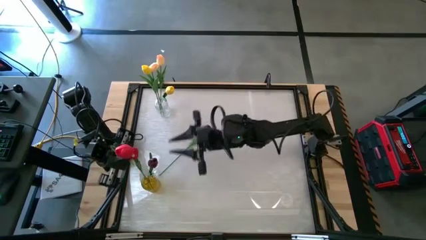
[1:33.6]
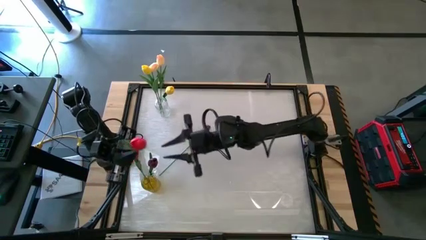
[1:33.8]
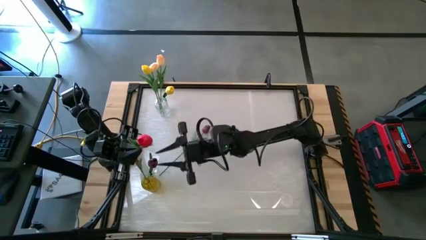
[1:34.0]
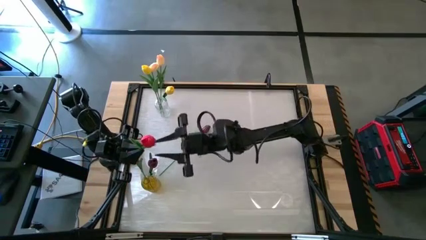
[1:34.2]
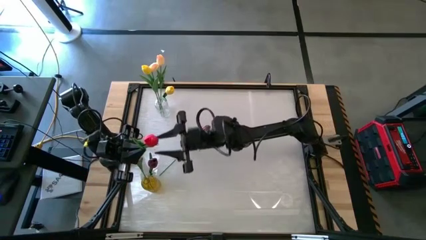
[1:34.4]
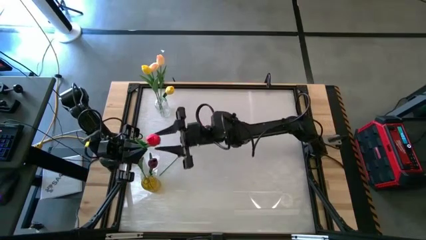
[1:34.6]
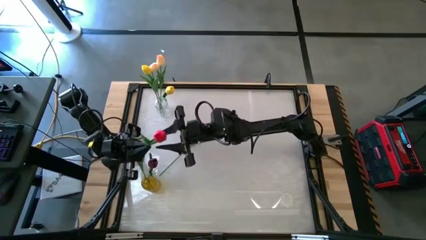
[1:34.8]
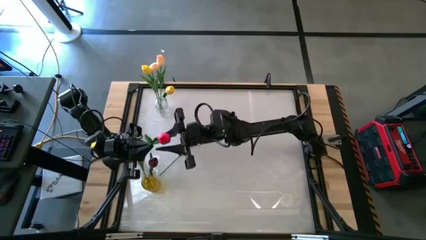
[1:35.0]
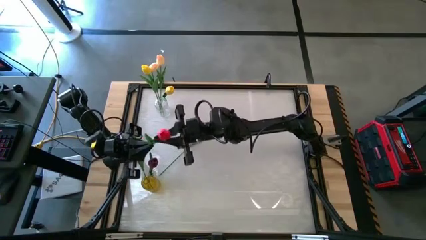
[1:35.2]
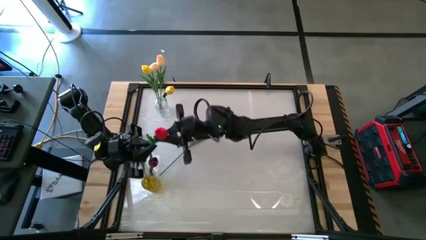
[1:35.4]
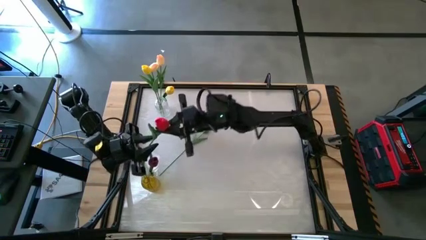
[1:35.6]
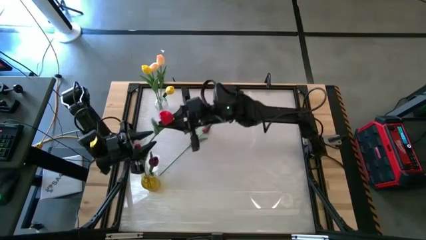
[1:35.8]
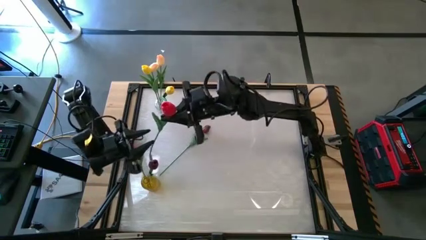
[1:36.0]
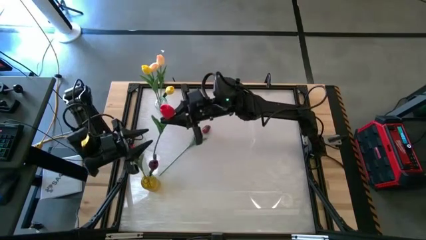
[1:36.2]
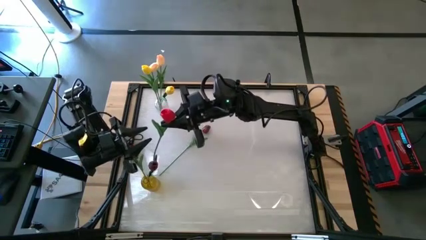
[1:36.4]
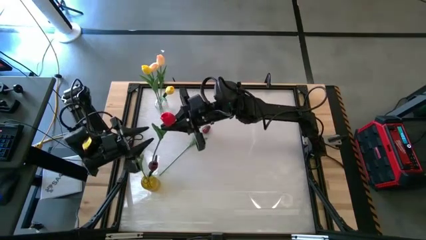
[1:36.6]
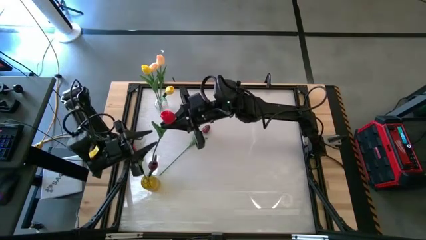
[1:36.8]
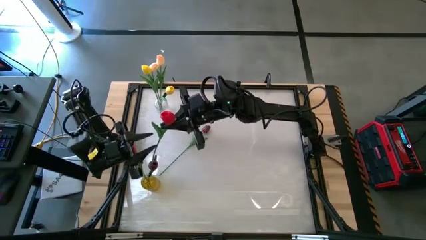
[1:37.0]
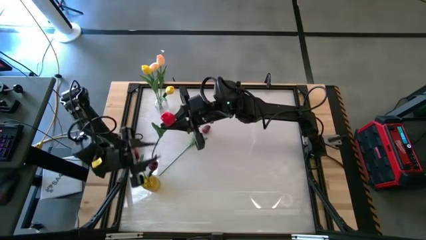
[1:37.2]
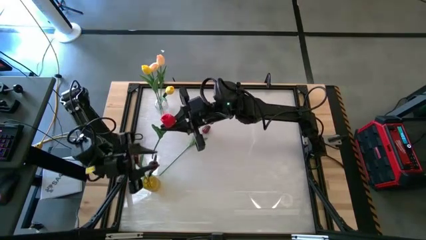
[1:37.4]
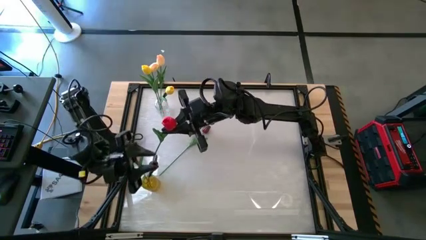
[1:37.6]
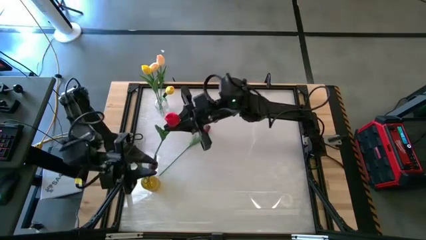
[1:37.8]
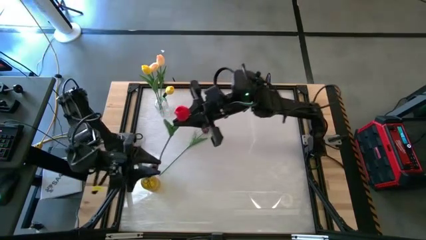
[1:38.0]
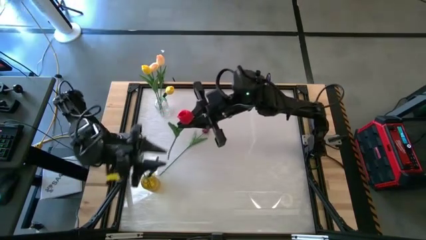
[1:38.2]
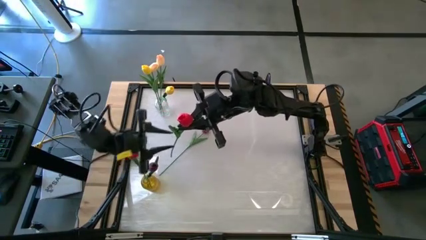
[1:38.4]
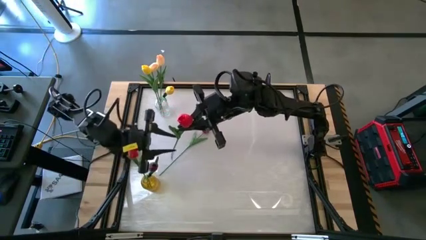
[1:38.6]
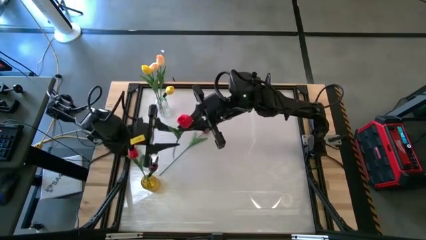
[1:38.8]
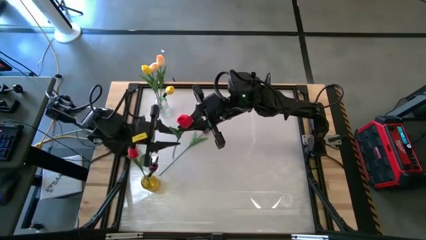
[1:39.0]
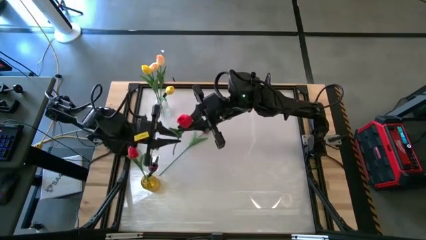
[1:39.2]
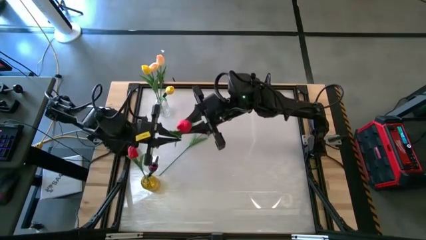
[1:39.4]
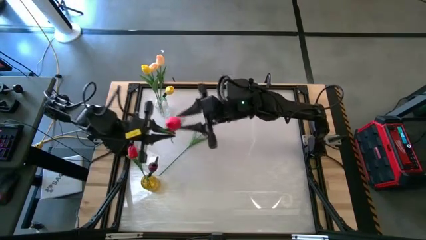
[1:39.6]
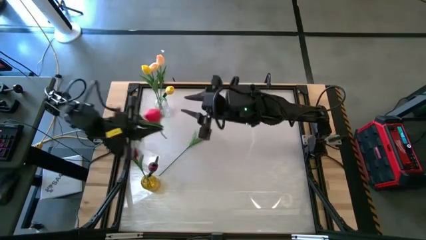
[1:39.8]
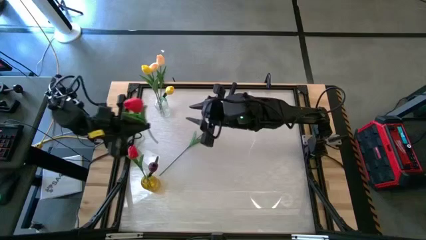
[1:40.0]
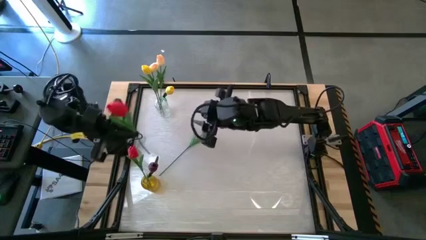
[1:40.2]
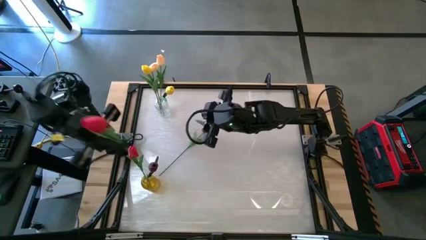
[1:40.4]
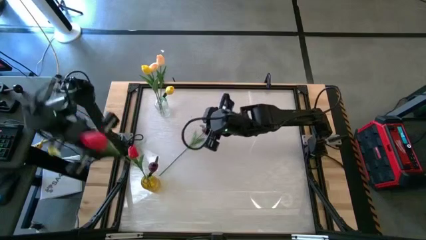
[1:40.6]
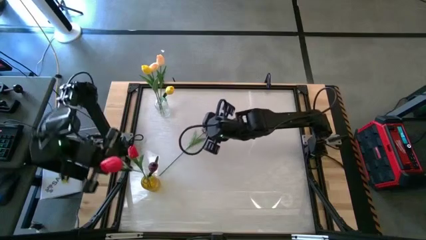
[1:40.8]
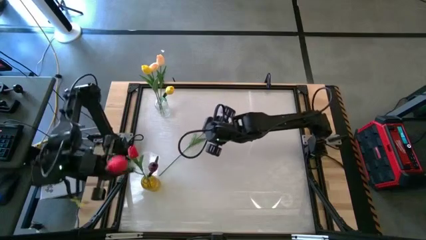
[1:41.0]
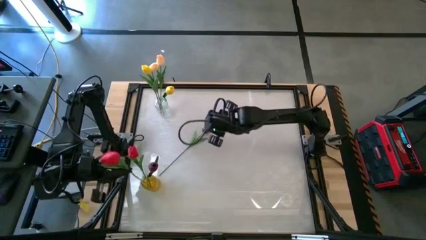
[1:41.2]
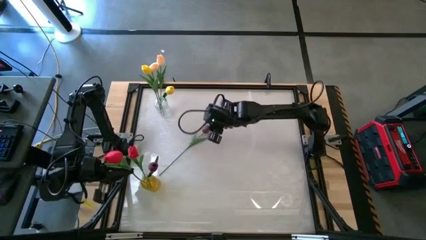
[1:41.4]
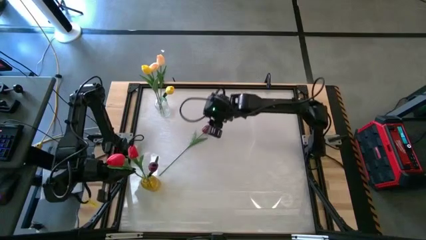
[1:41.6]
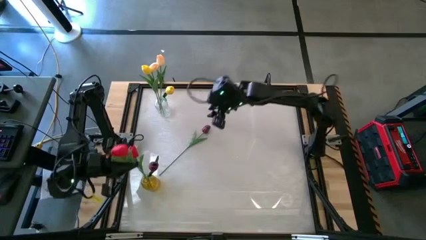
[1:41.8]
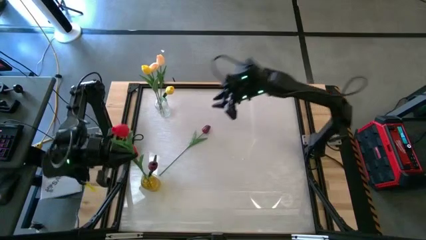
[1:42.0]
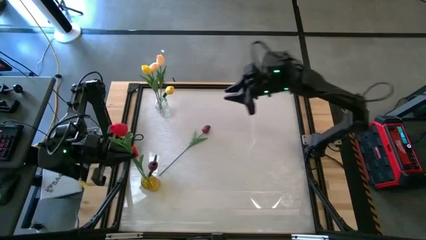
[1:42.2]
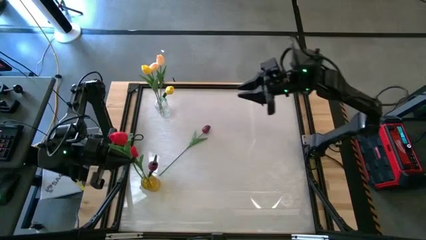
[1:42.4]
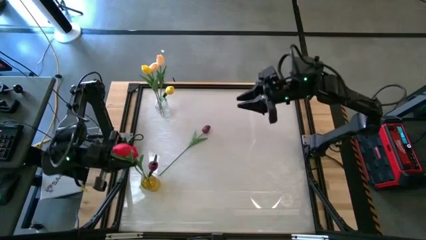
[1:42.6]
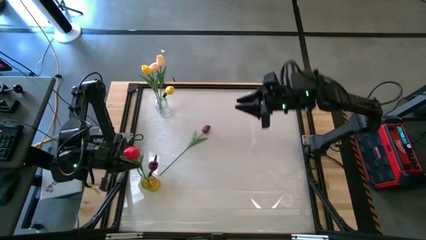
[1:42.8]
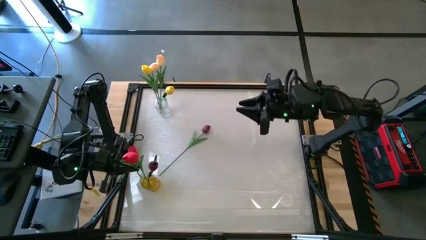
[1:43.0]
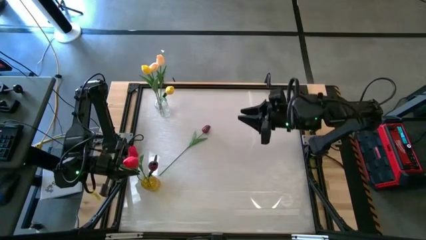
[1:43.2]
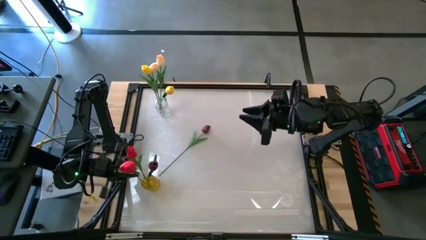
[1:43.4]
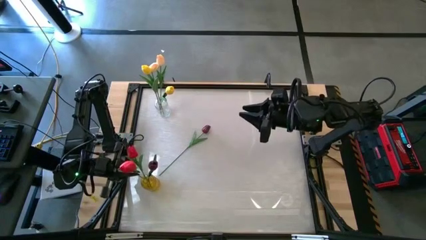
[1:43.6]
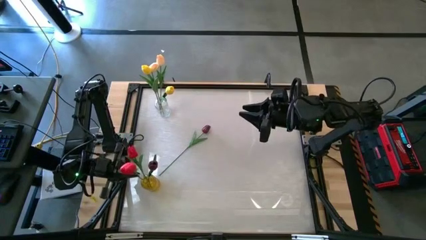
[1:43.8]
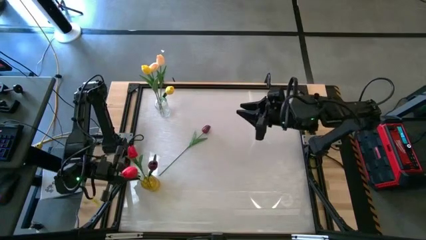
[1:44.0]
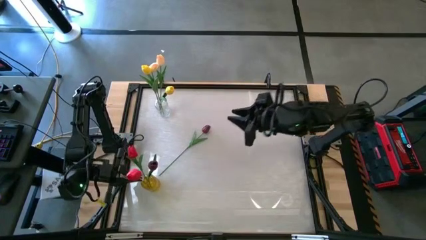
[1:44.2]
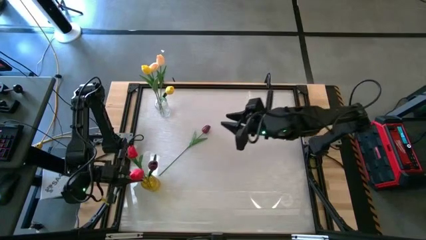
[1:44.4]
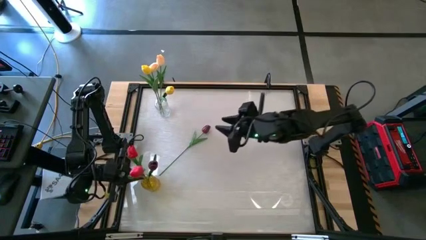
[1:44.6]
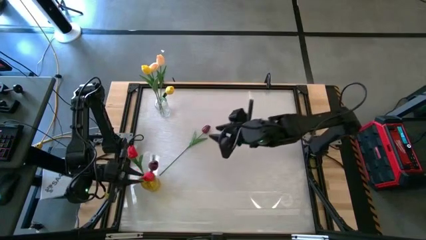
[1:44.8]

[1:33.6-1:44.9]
Task: Sort flowers into vase by color
Put the red tulip into the orange vase

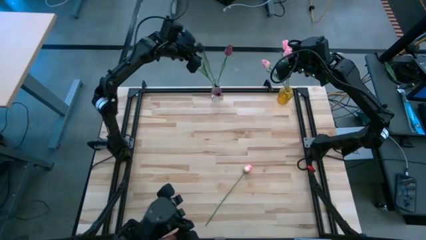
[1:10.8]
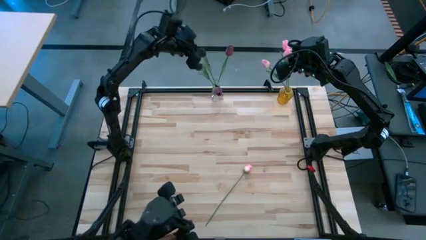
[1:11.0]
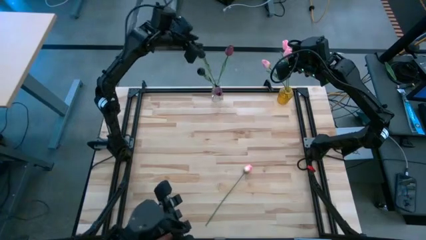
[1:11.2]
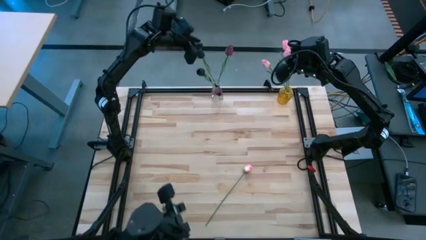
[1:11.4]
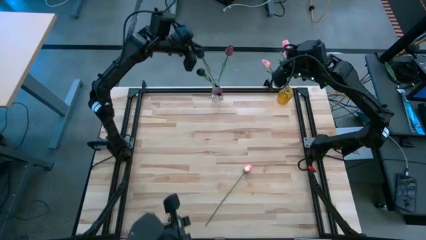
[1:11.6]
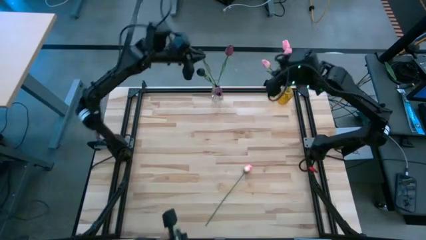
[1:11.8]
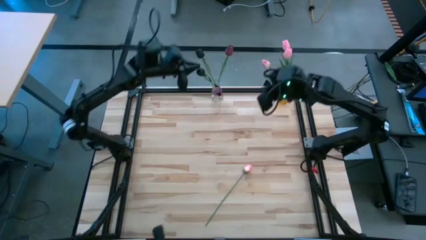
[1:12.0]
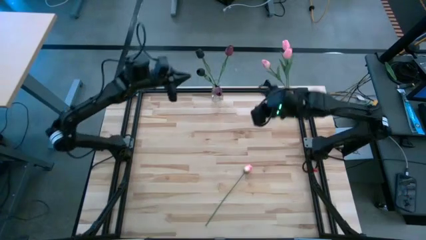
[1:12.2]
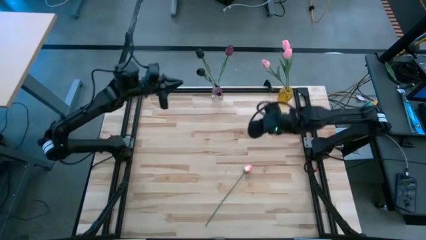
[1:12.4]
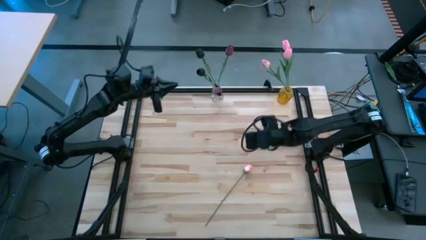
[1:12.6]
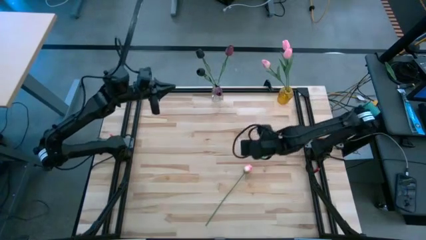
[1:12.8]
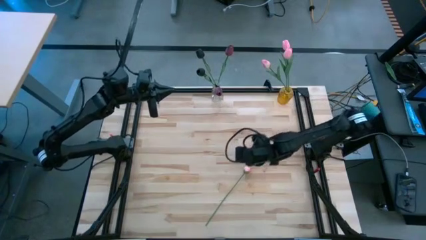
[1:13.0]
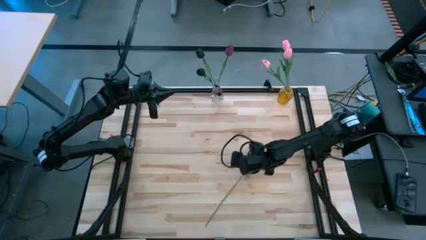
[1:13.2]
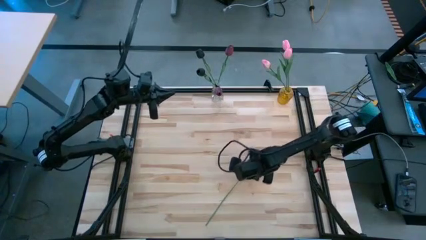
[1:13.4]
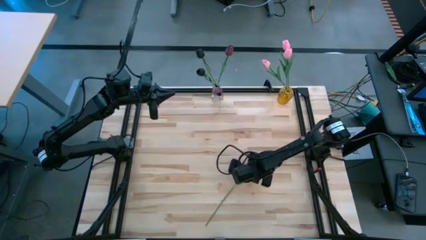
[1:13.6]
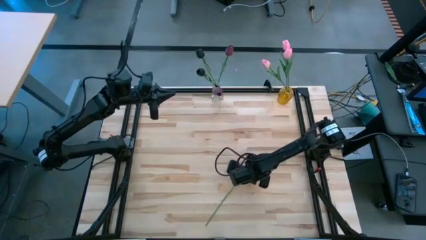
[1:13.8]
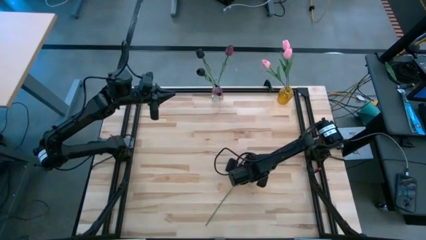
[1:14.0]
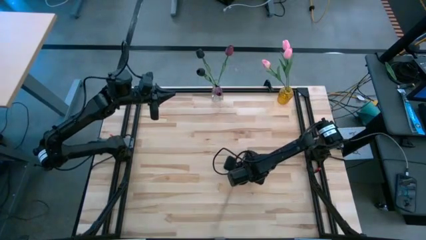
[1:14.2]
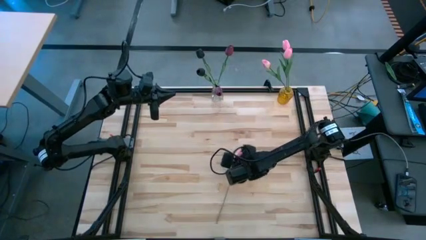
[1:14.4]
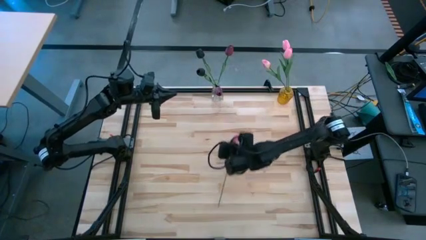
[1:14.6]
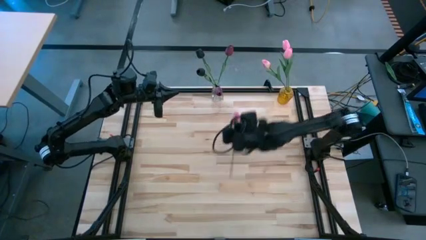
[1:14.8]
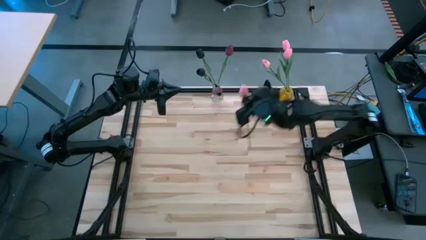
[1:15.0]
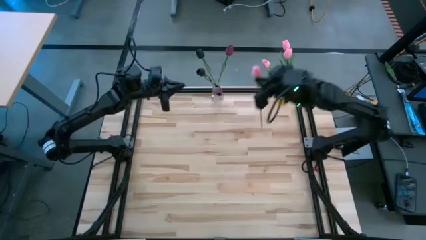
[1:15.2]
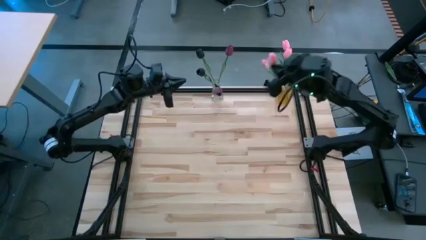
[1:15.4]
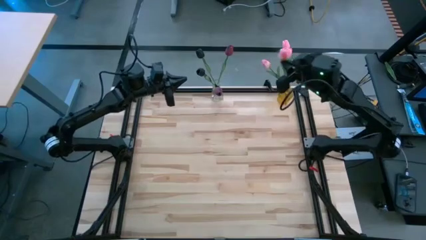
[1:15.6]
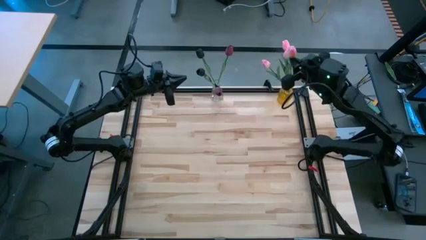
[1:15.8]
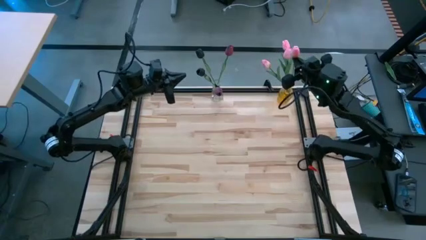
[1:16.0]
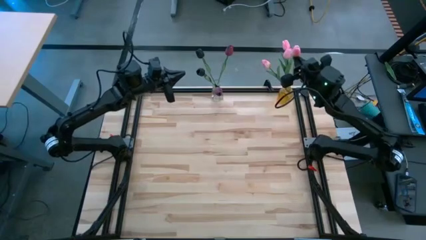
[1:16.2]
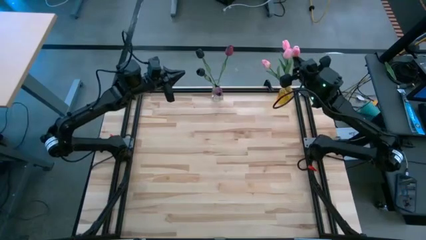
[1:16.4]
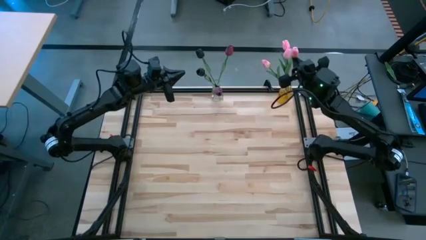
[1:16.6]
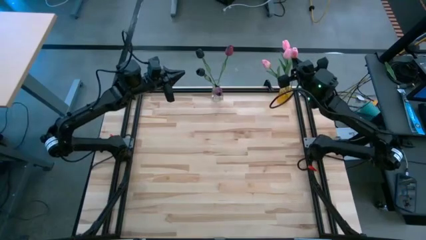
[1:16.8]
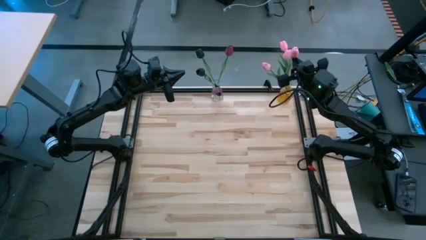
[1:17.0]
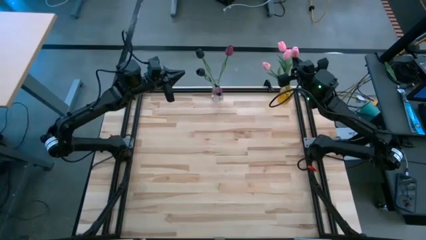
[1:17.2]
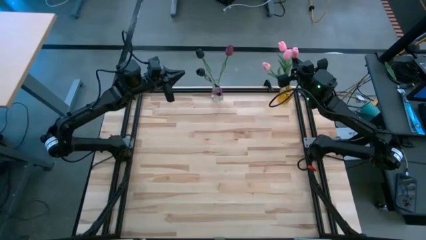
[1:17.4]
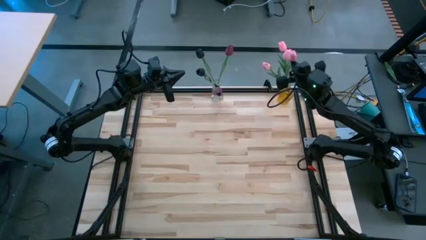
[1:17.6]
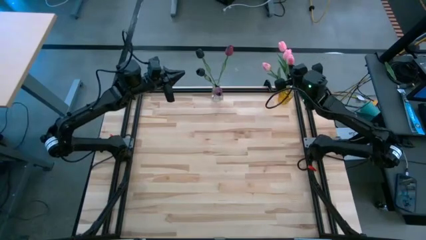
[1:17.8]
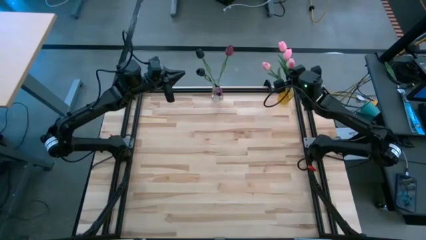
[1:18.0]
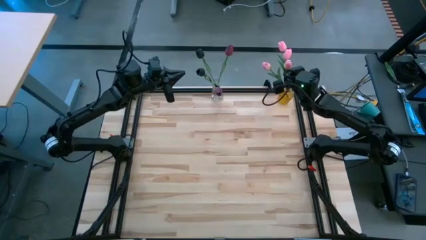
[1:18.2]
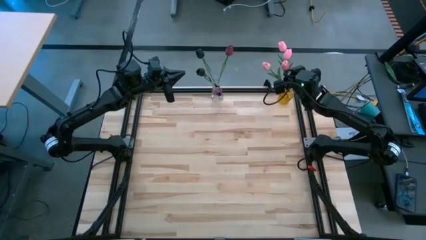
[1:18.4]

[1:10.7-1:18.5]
Task: Sort flowers into vase by color
Put the pink tulip into the yellow crystal vase
